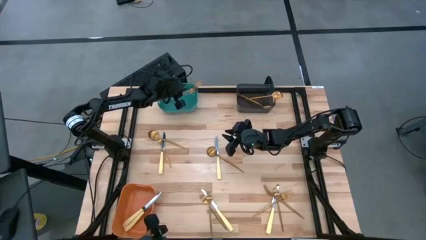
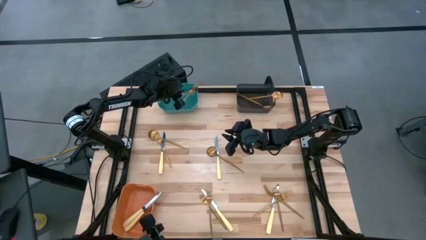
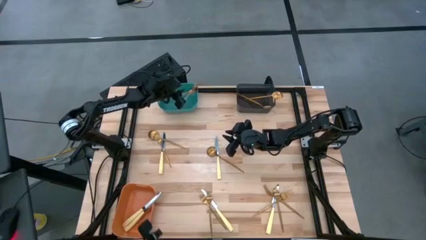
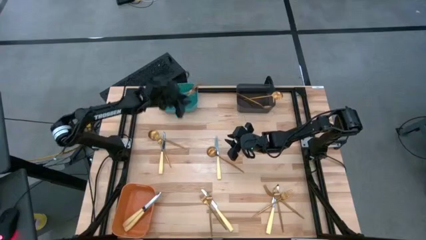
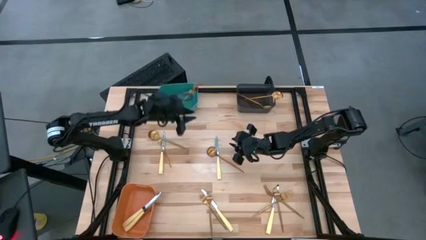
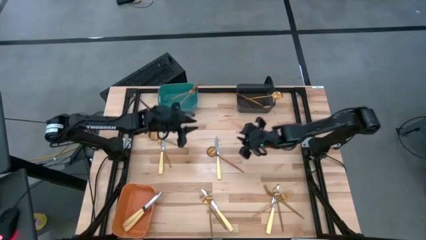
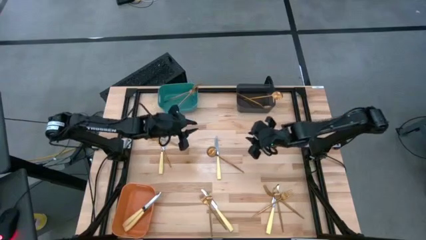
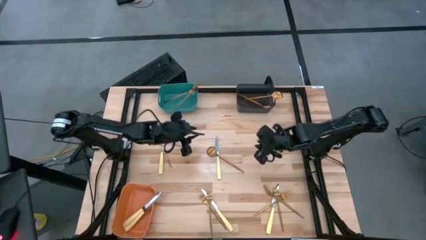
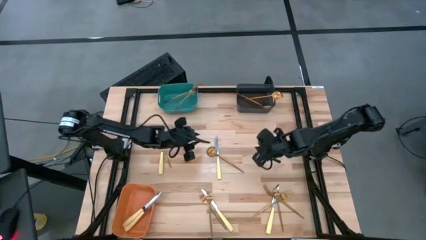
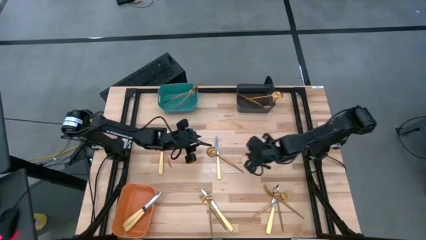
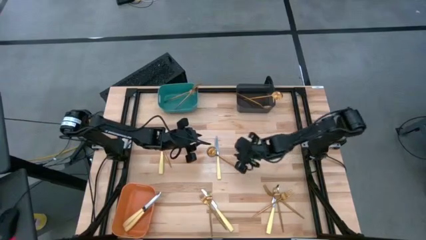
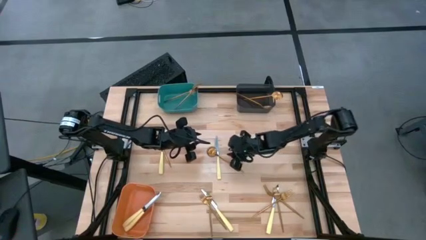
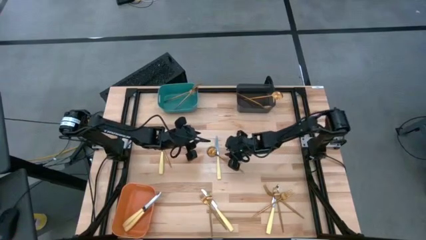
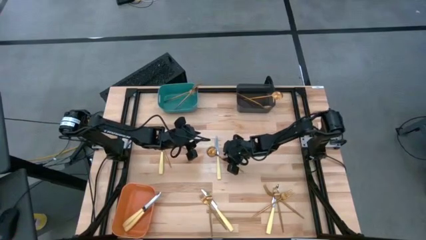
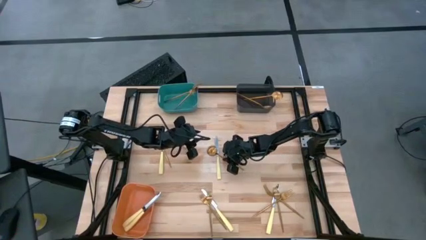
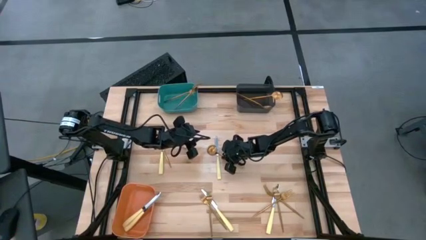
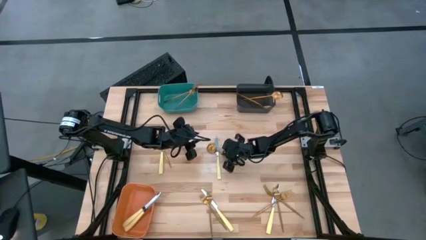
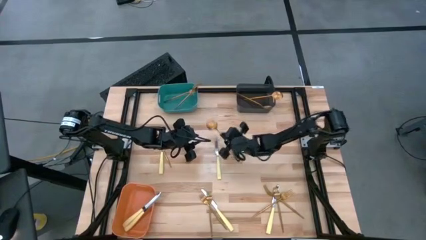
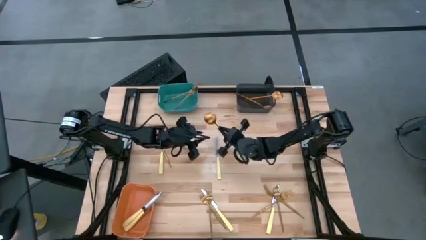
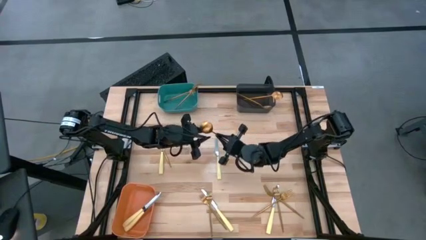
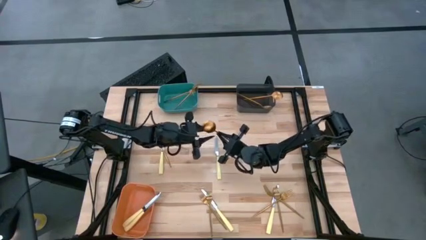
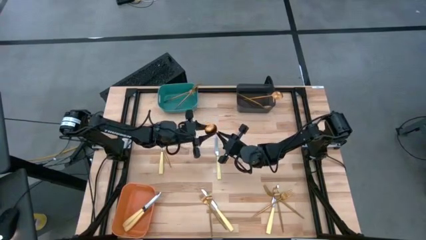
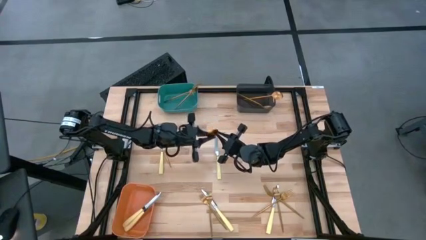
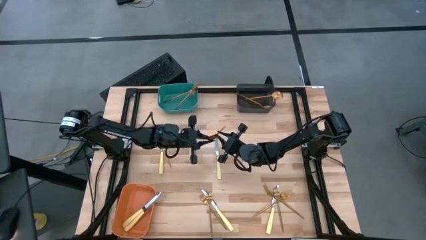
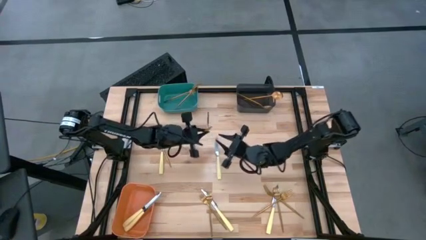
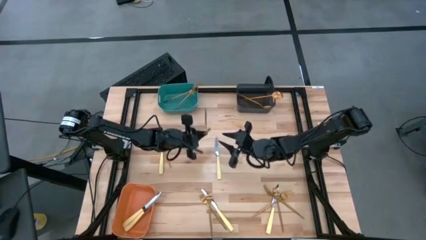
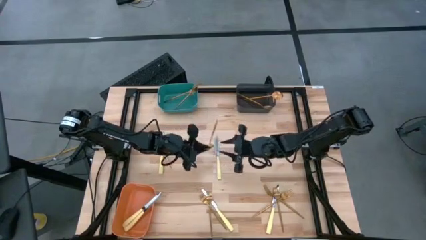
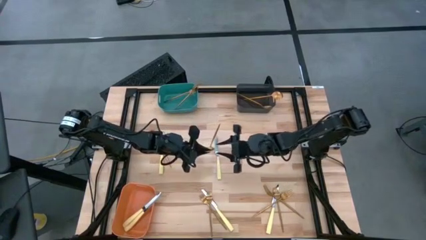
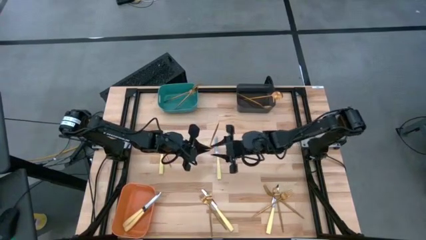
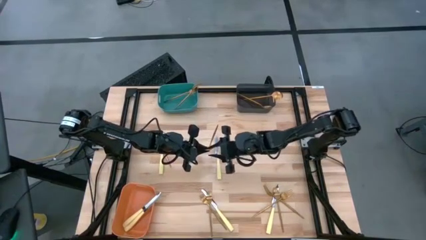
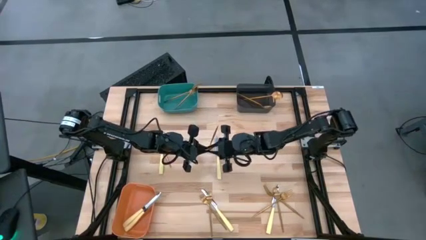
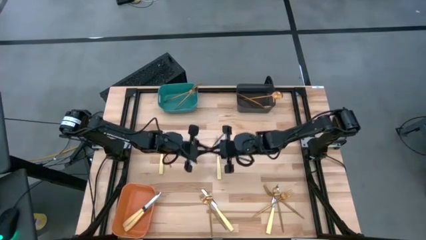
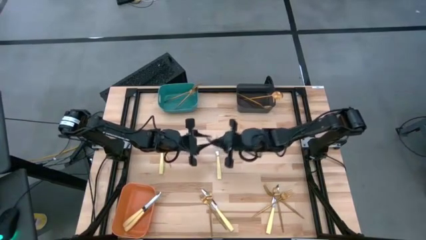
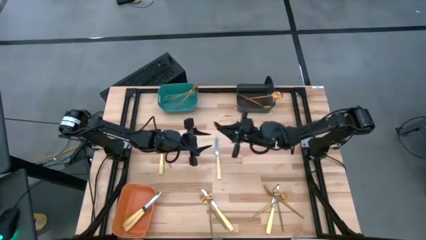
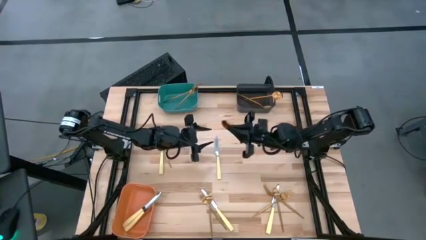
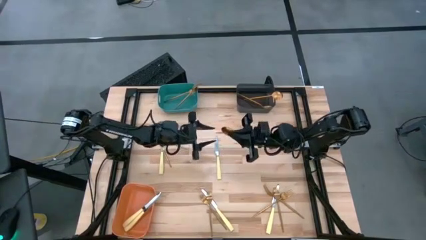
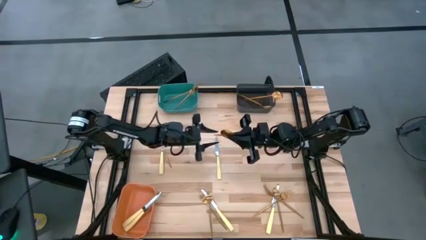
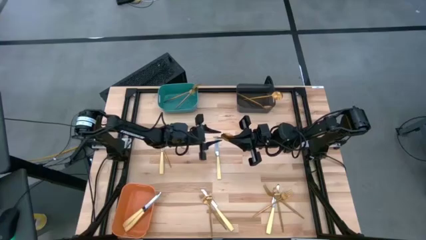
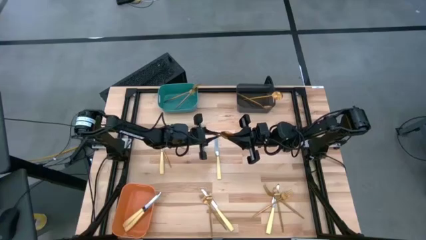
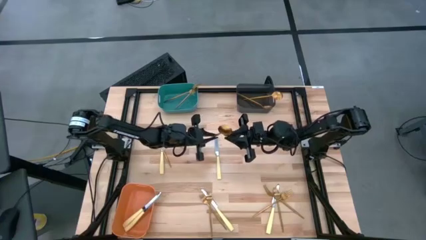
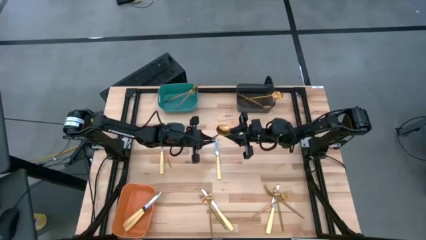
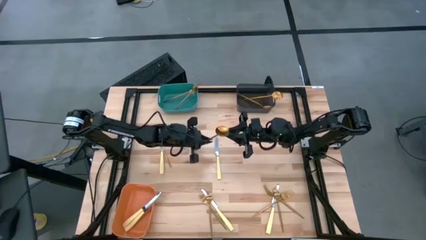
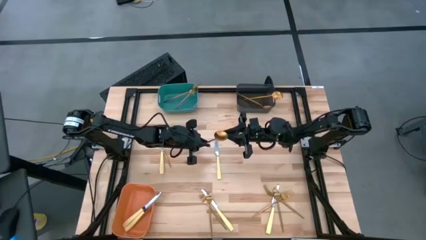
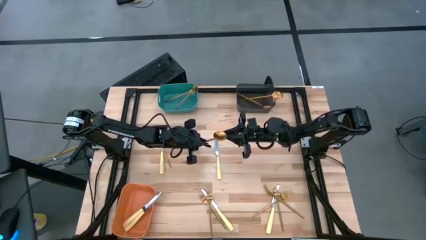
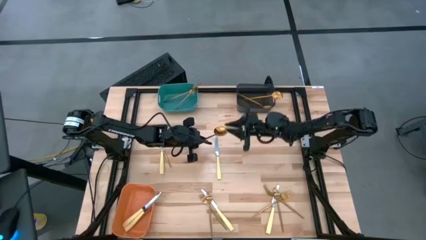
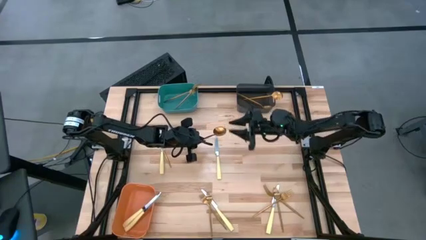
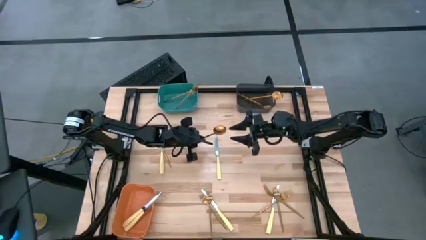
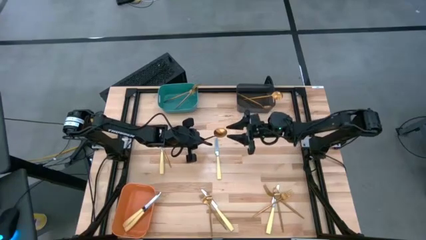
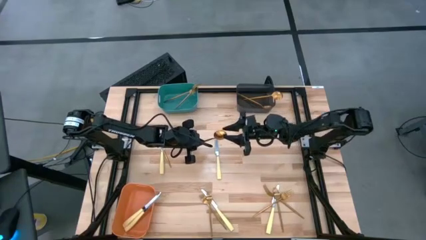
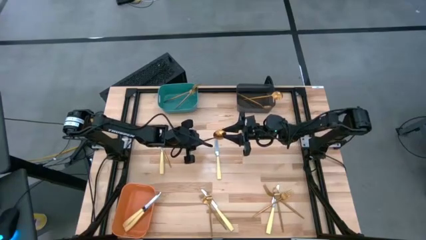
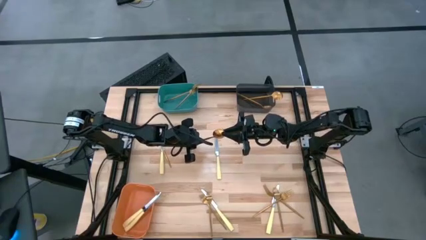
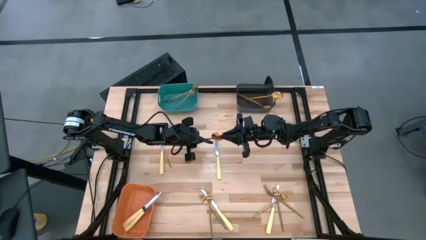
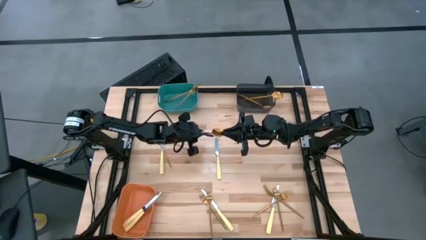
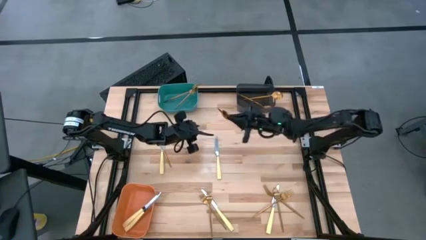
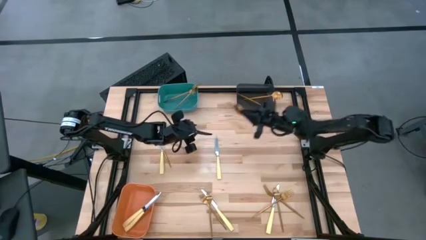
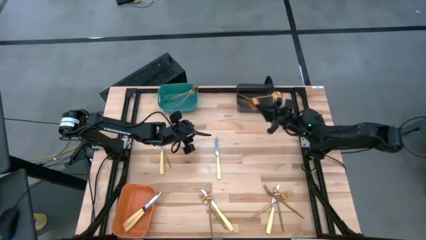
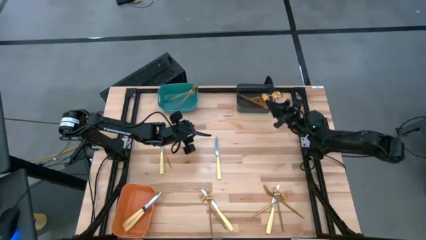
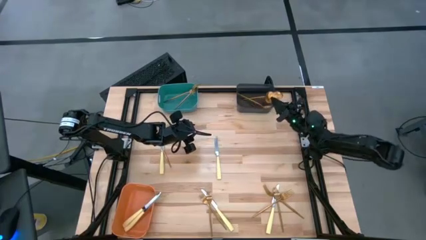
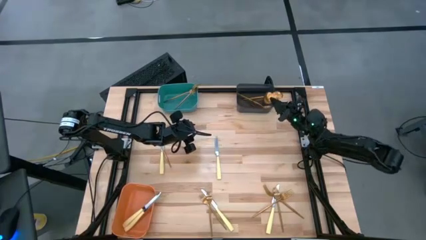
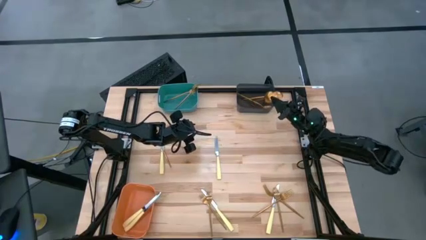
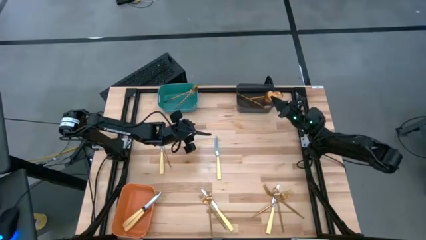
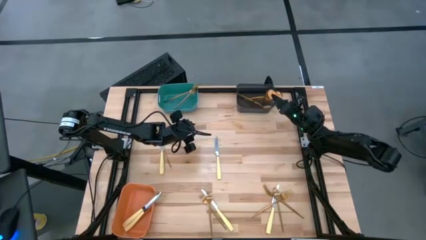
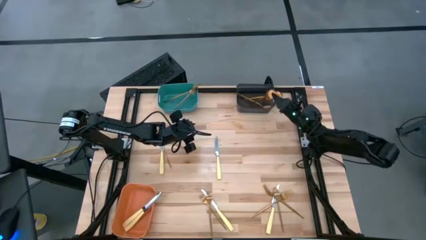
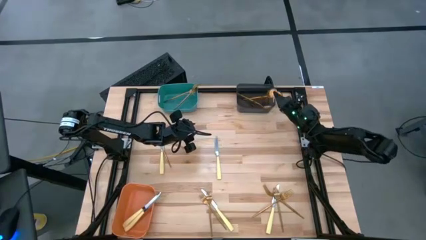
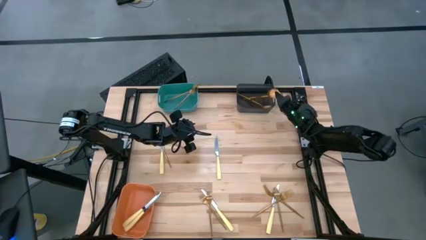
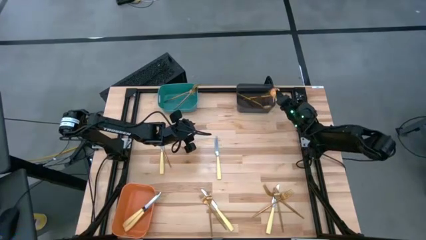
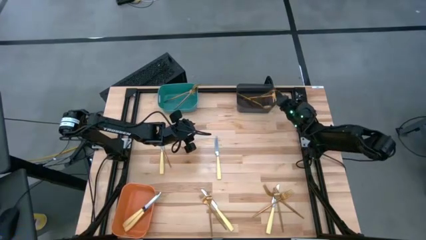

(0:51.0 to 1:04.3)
Task: Sort silverware by color (type)
Put the gold spoon into the black bin

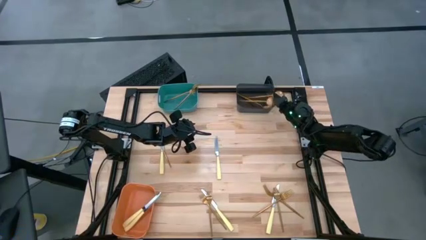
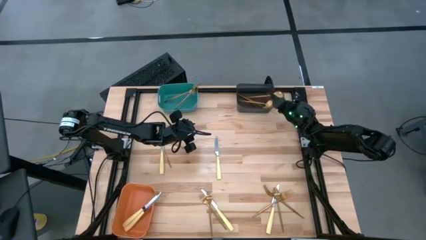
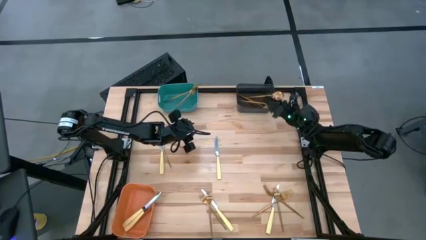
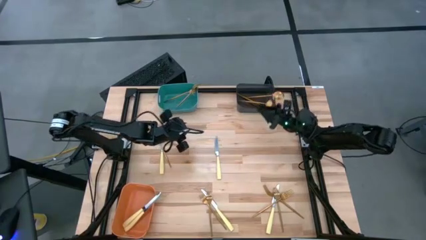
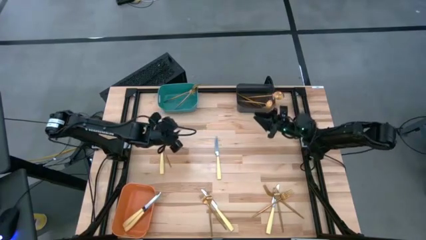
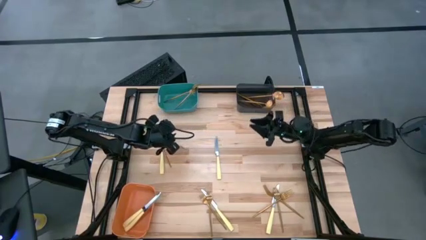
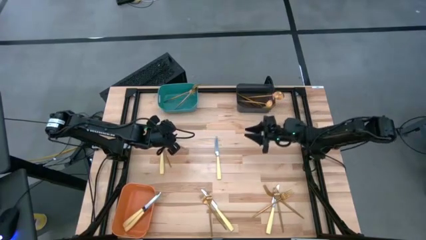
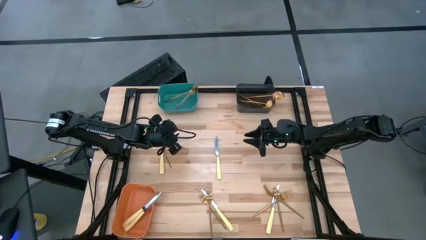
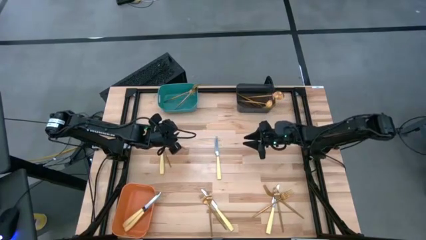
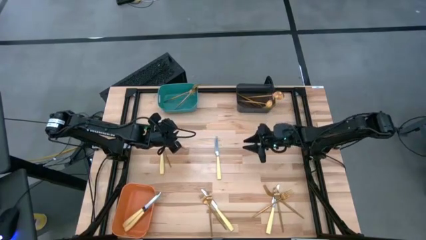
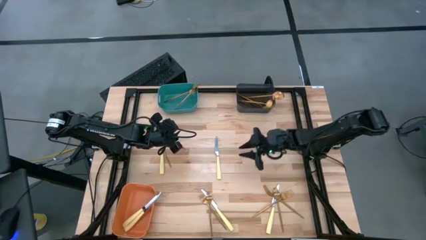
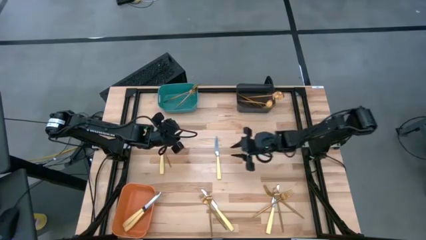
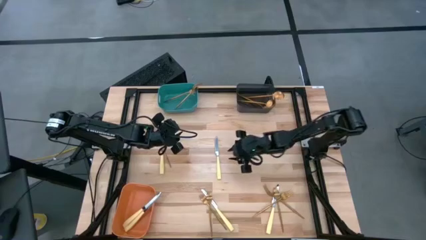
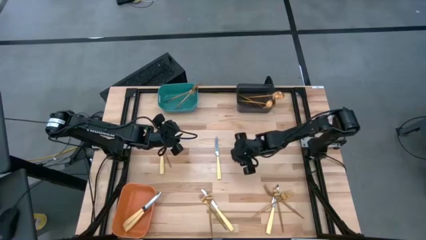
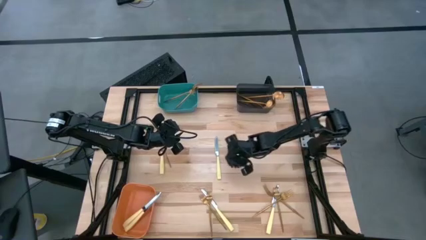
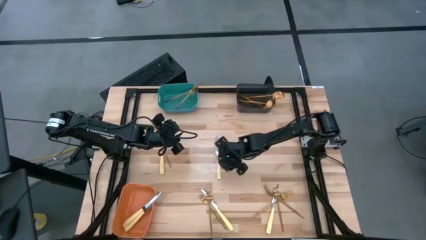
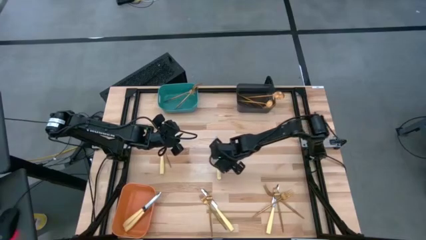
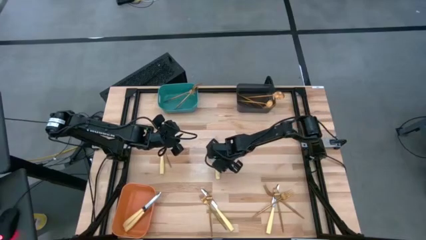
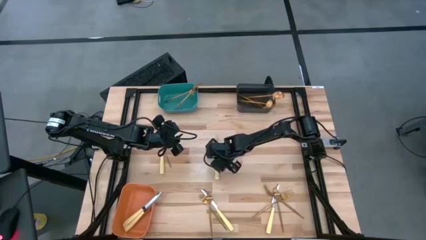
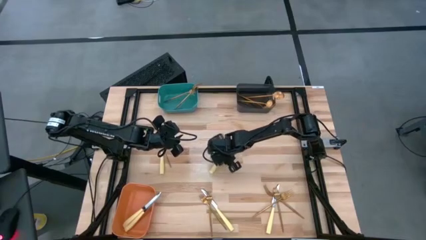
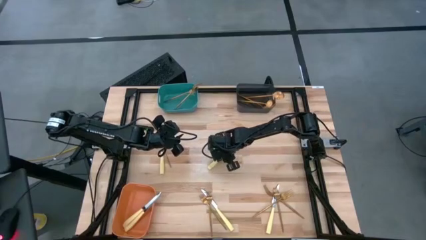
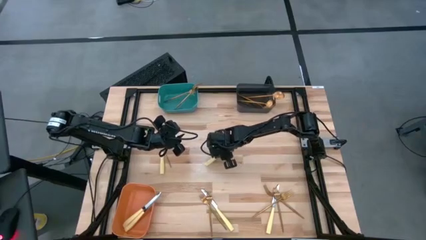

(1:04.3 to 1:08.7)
Put the yellow table knife into the orange bin
